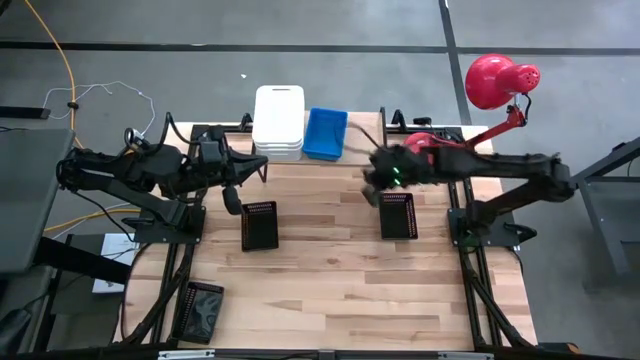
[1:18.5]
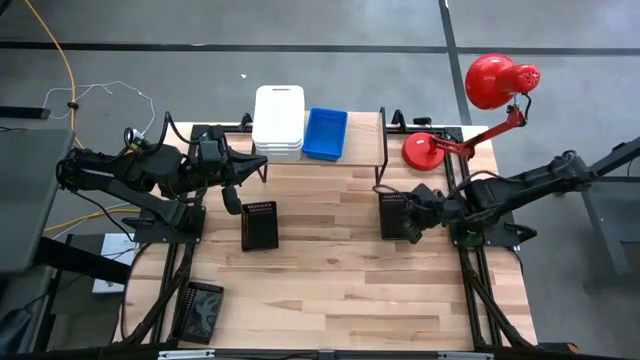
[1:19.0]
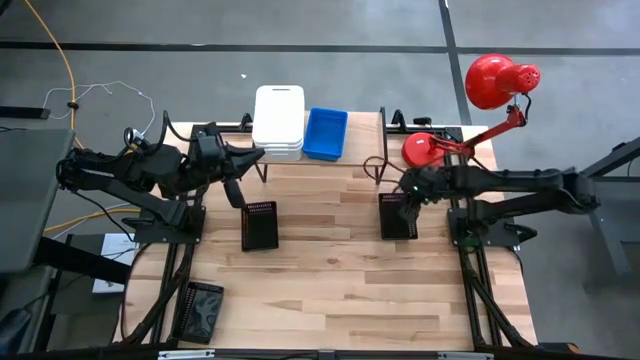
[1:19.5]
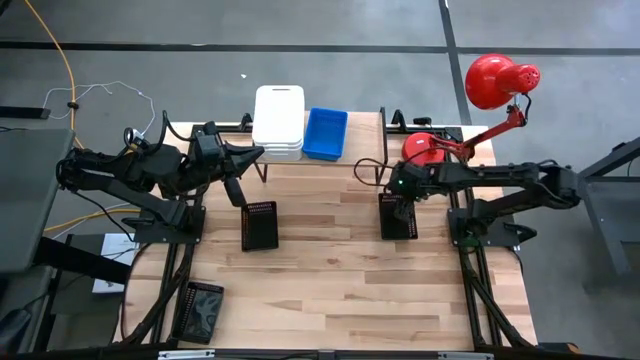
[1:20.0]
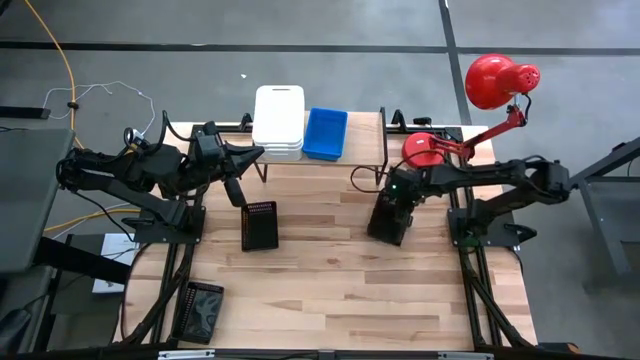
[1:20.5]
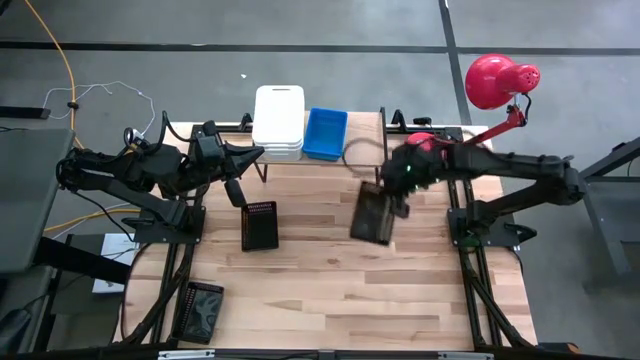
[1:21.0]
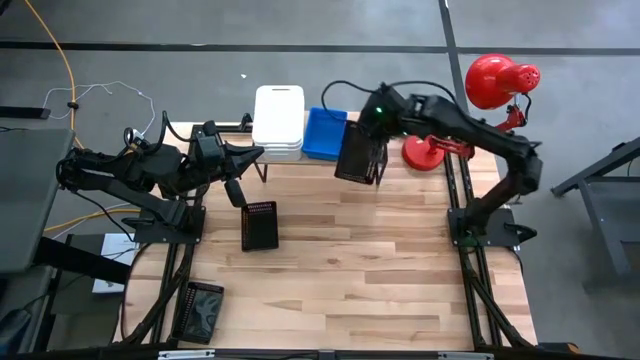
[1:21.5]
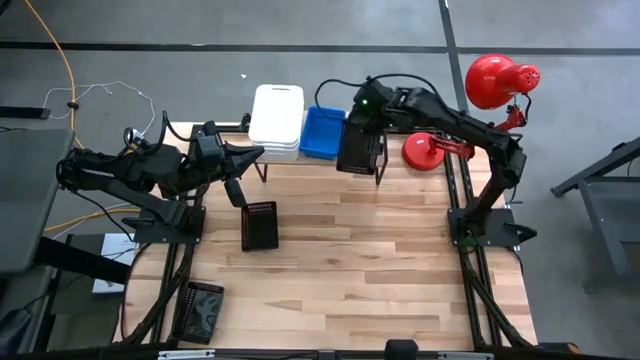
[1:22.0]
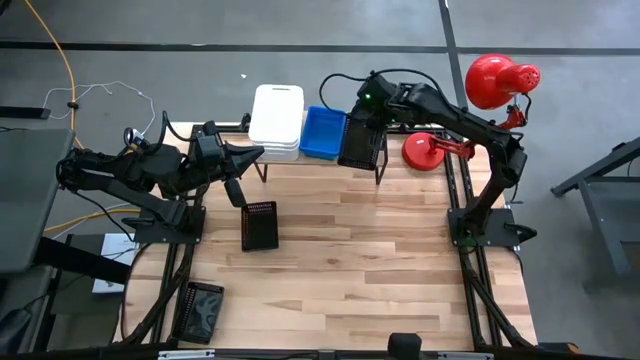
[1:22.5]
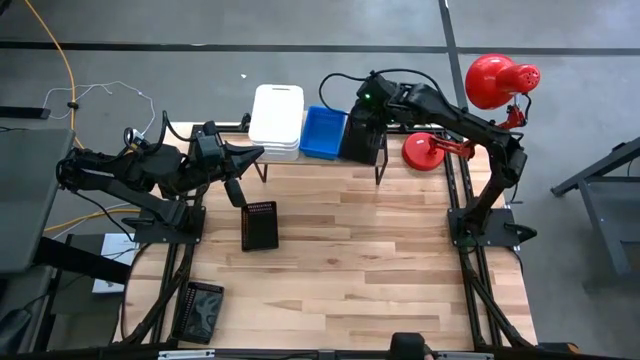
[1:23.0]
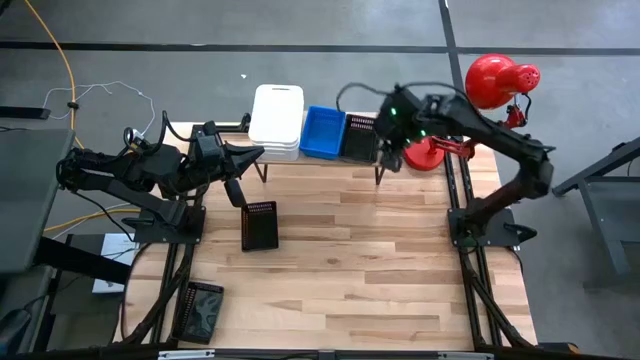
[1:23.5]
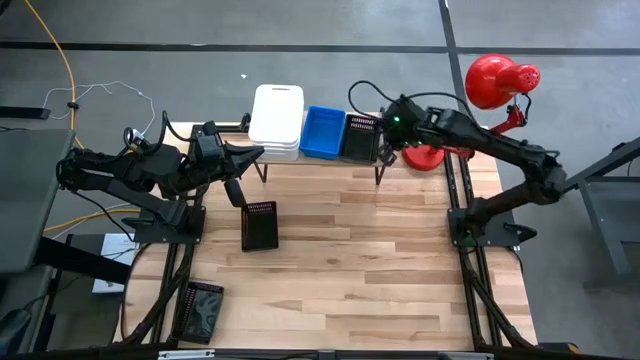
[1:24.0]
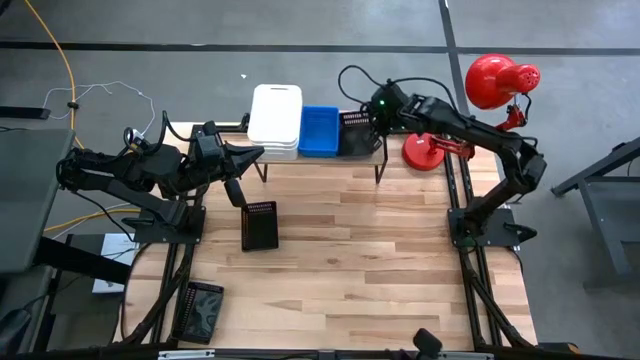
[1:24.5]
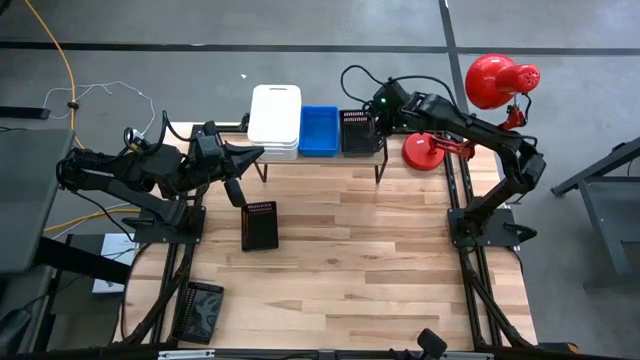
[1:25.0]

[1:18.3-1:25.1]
Task: Stack baskets on shelf by color
Put the right black bin on the shelf

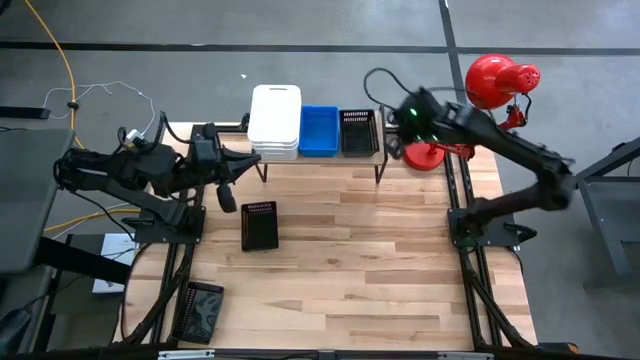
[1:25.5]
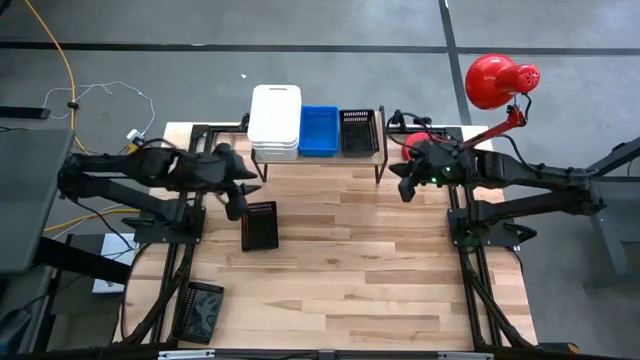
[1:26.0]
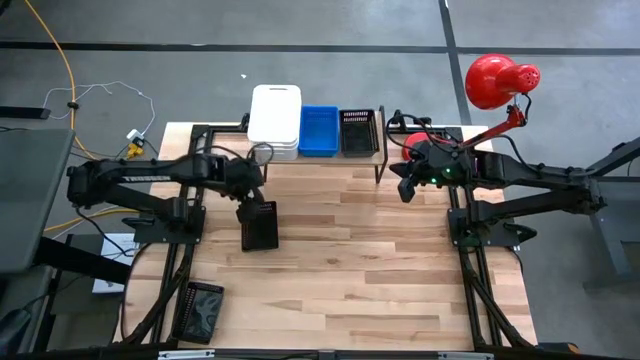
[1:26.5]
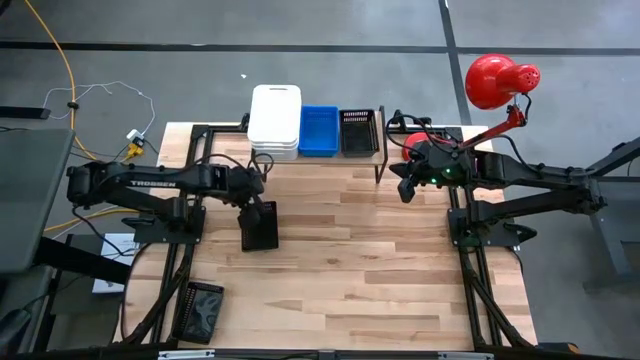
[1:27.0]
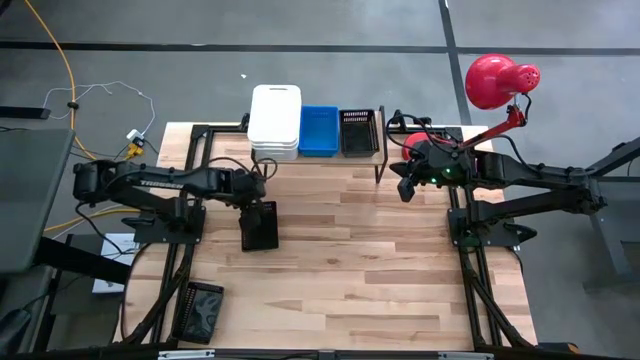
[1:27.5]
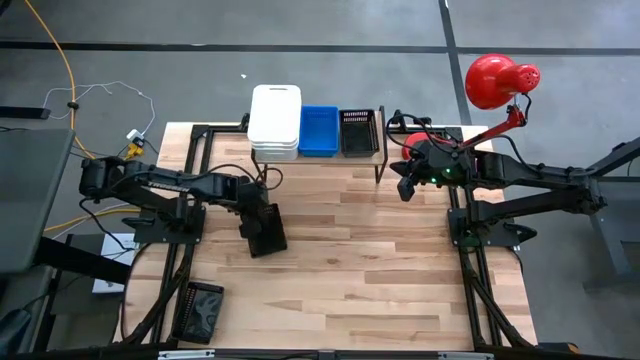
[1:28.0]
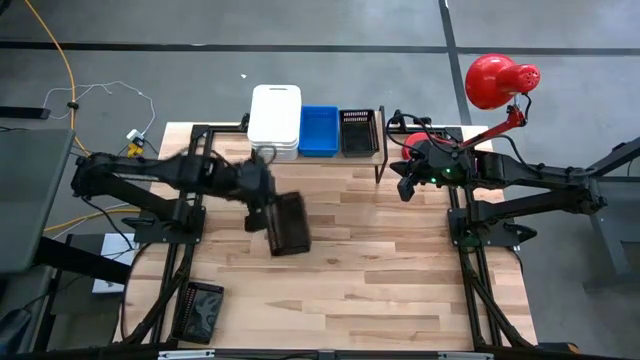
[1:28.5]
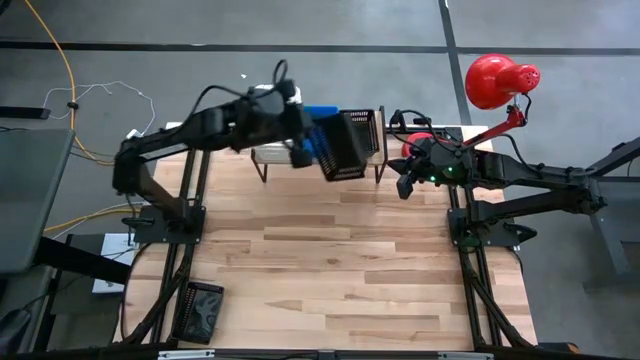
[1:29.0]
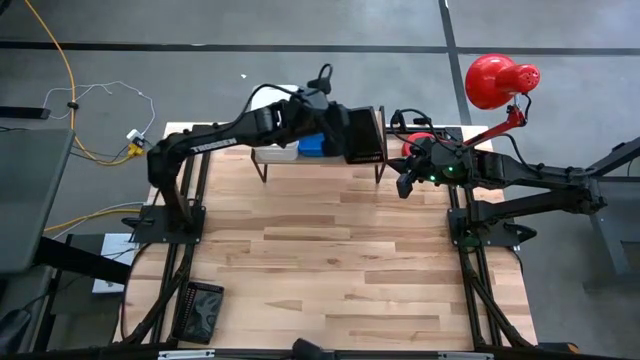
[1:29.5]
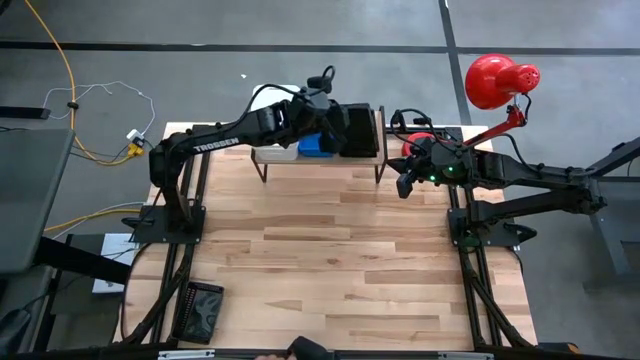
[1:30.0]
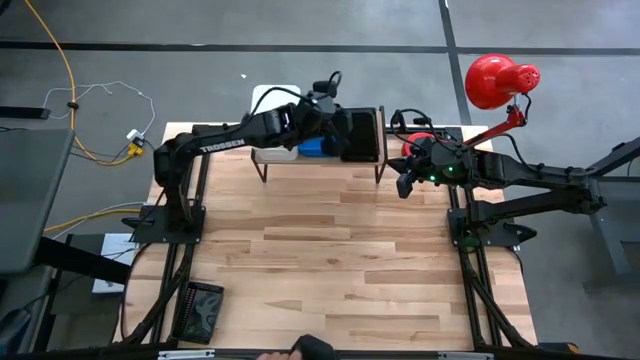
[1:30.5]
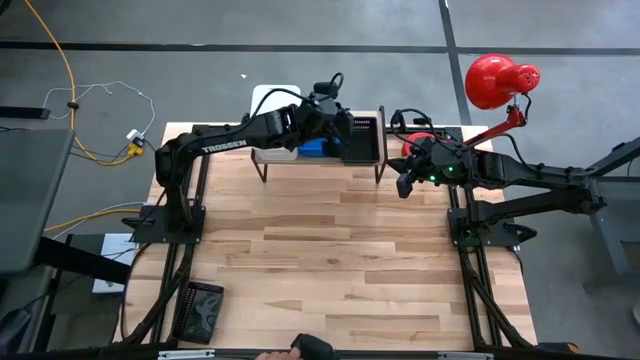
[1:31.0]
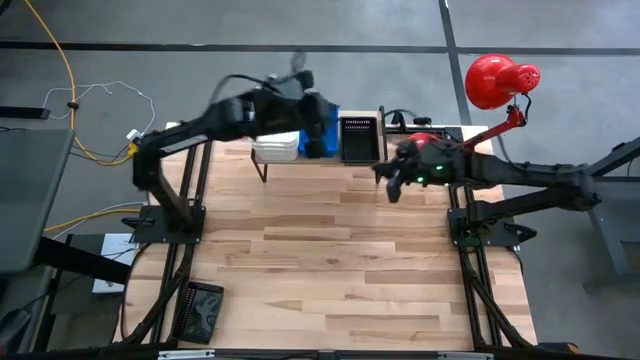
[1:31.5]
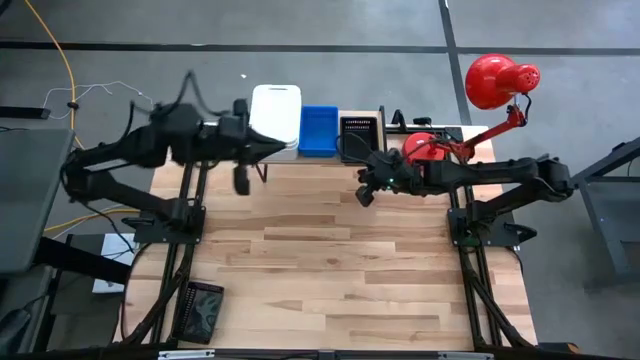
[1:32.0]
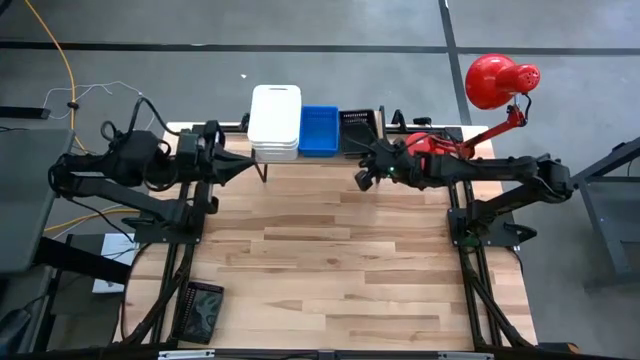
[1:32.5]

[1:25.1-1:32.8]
Stack the top black bin on top of the black bin on the shelf

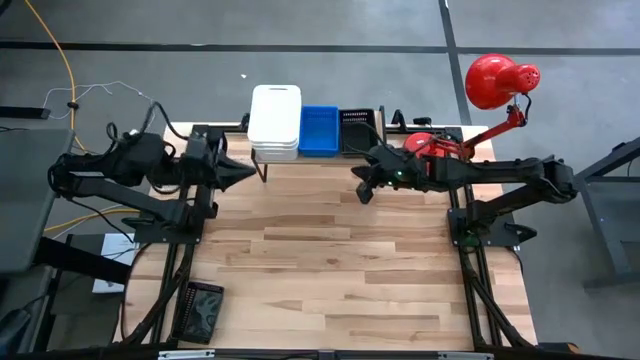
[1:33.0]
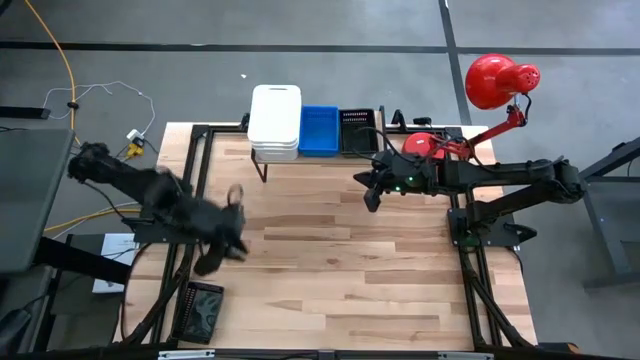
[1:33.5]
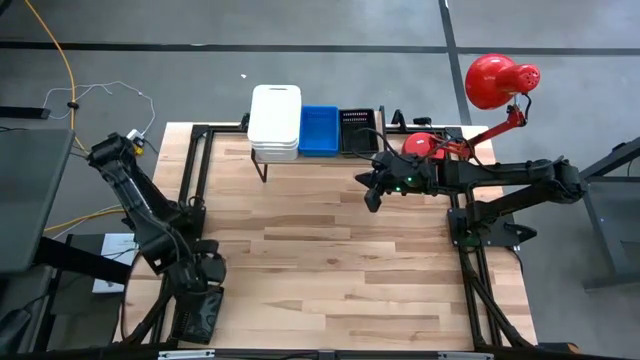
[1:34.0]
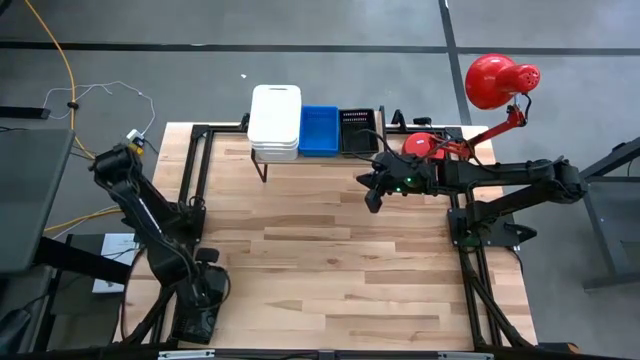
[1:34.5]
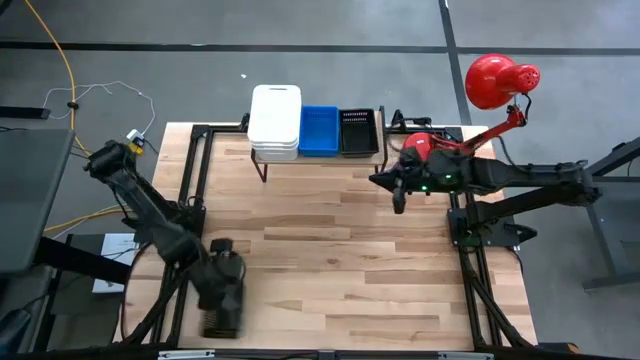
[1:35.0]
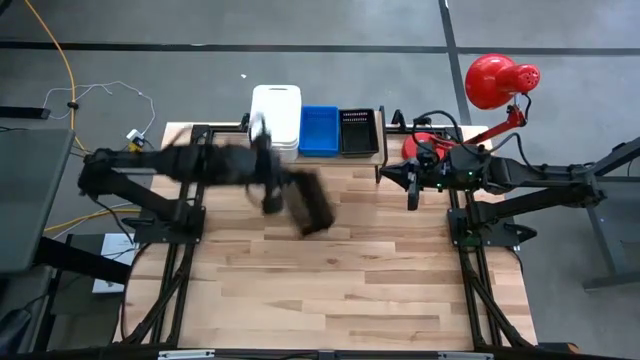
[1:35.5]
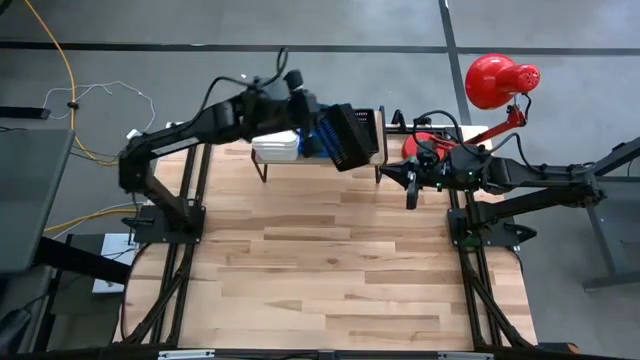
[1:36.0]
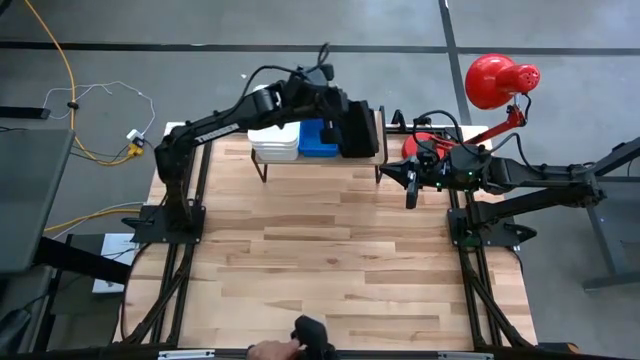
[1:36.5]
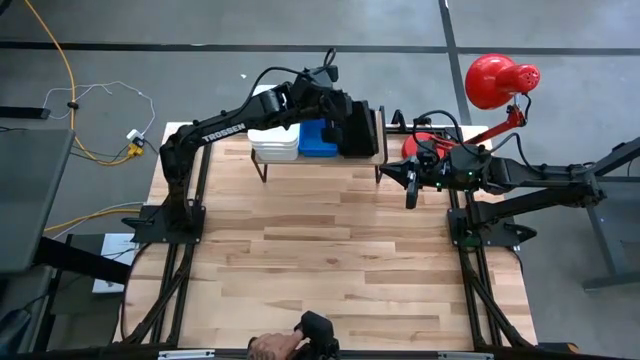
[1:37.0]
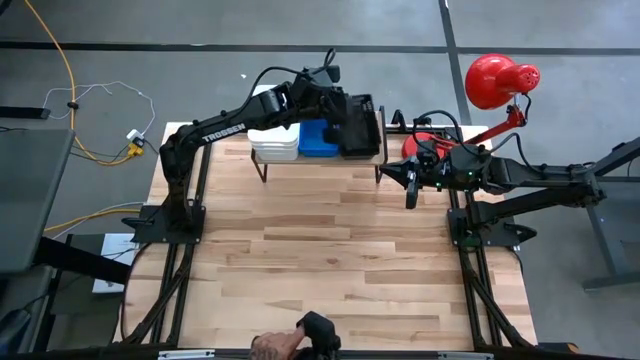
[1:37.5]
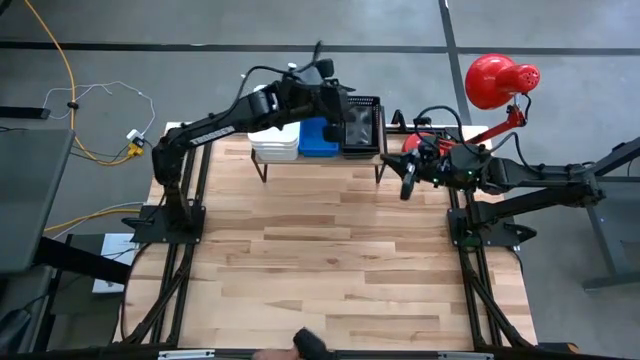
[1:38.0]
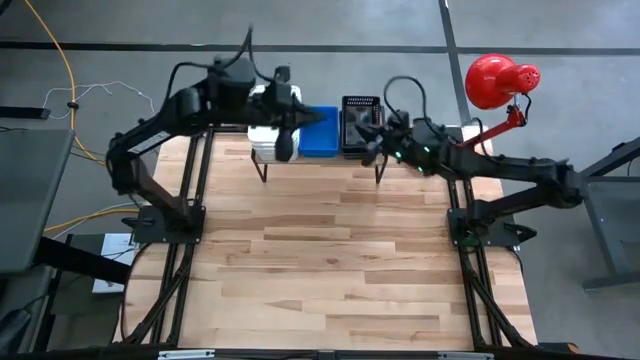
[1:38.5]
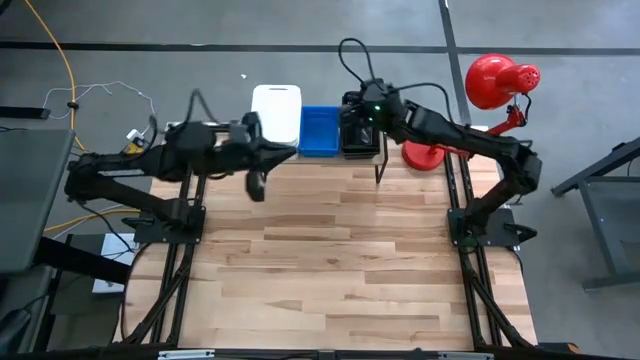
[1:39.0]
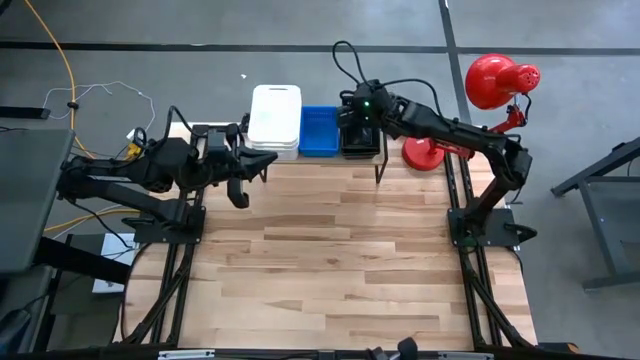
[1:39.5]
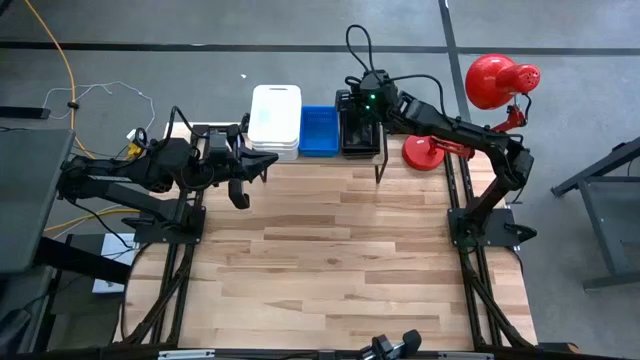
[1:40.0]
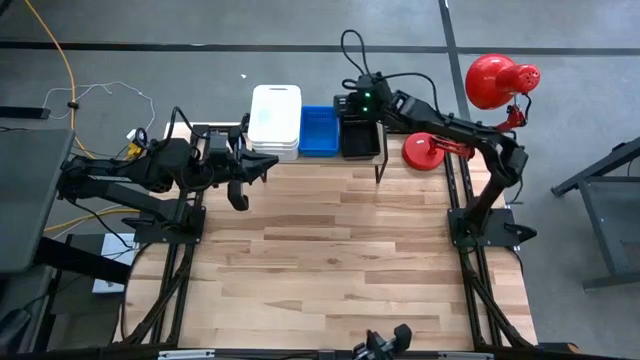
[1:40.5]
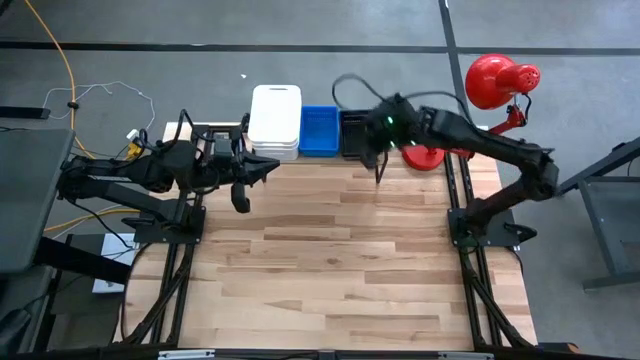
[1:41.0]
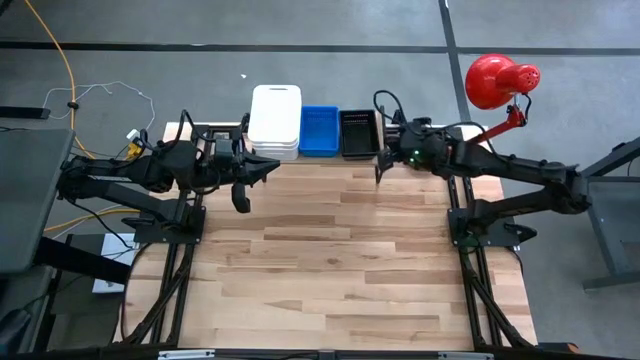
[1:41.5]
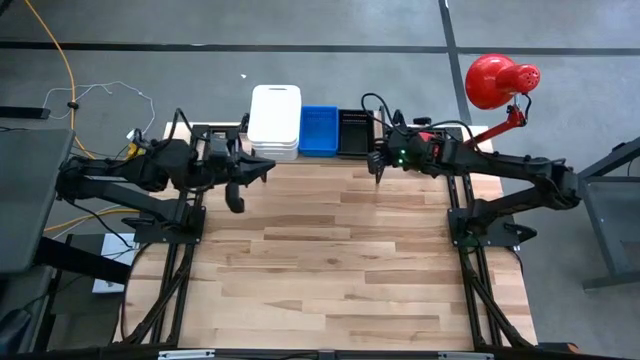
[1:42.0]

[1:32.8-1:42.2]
Stack the black bin on top of the black bin on the shelf
